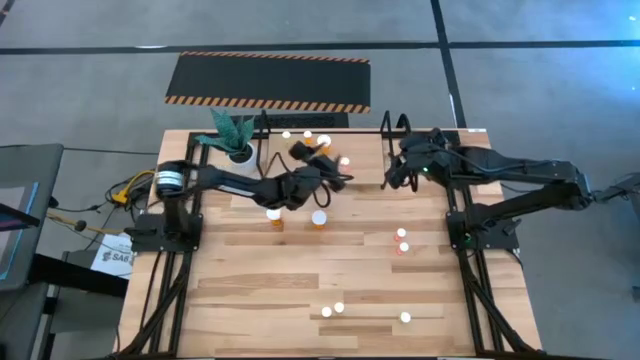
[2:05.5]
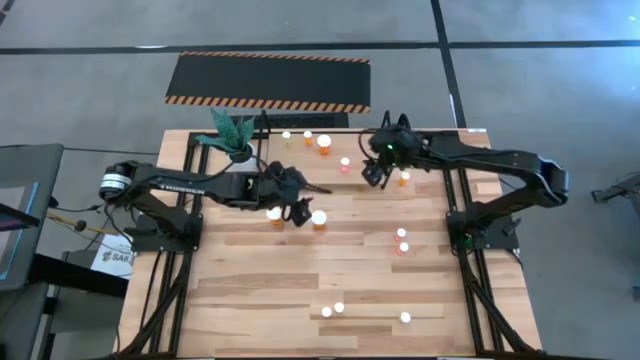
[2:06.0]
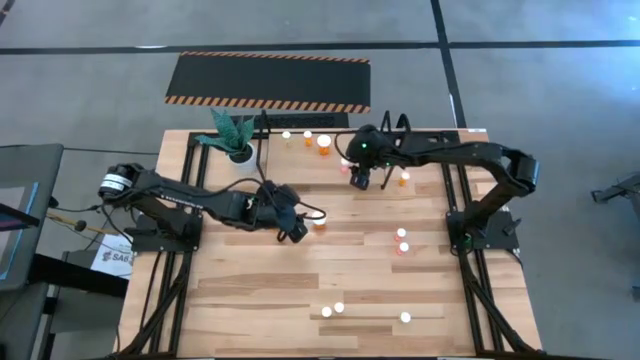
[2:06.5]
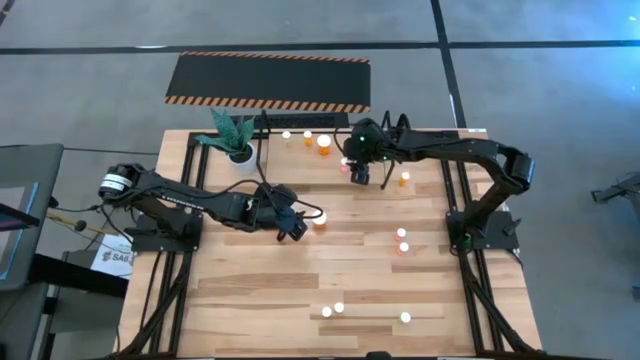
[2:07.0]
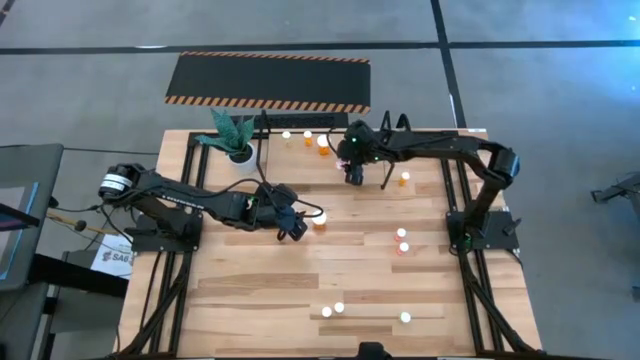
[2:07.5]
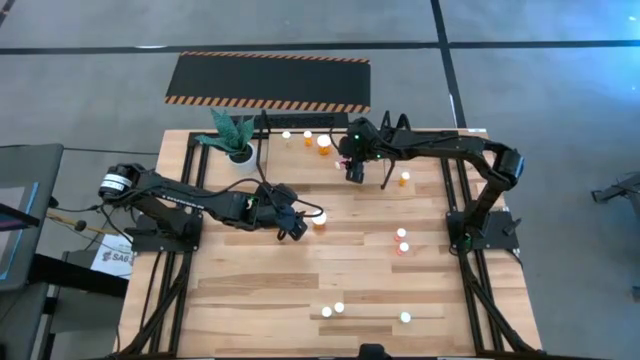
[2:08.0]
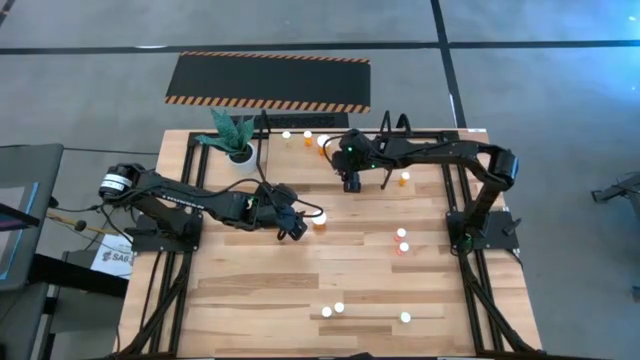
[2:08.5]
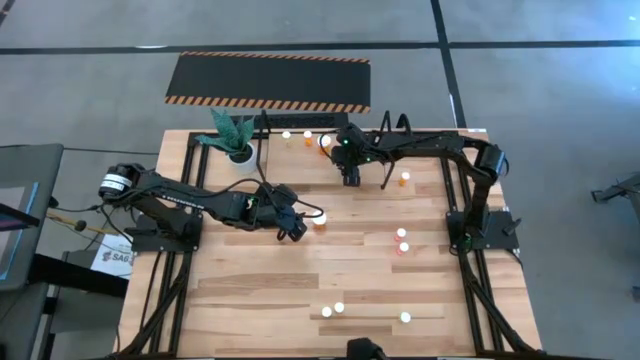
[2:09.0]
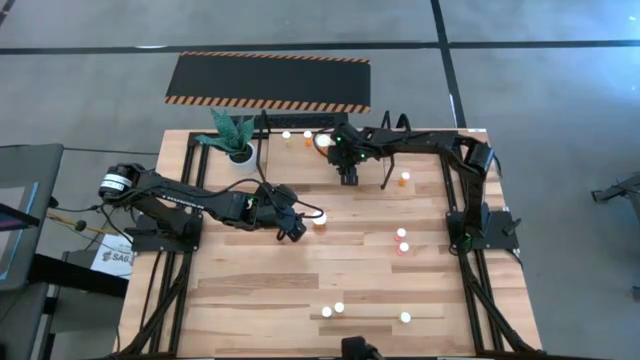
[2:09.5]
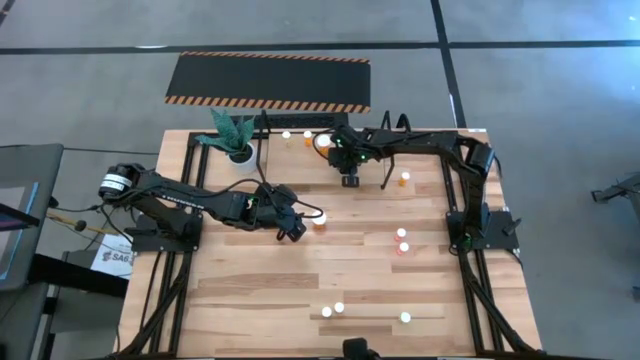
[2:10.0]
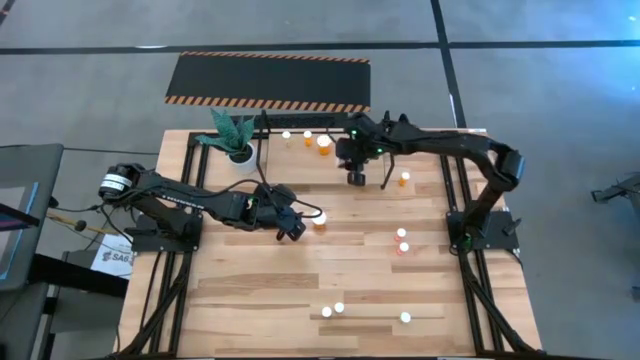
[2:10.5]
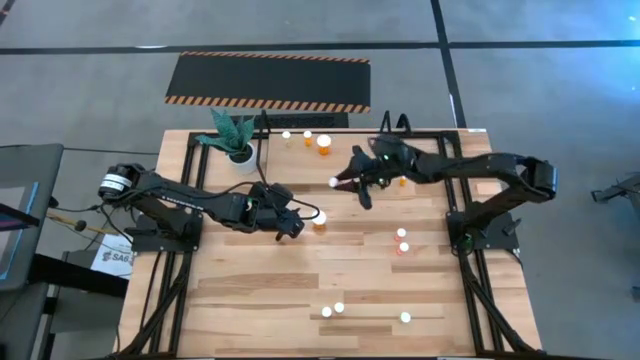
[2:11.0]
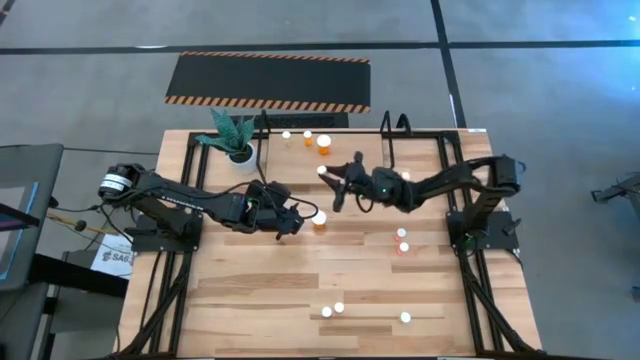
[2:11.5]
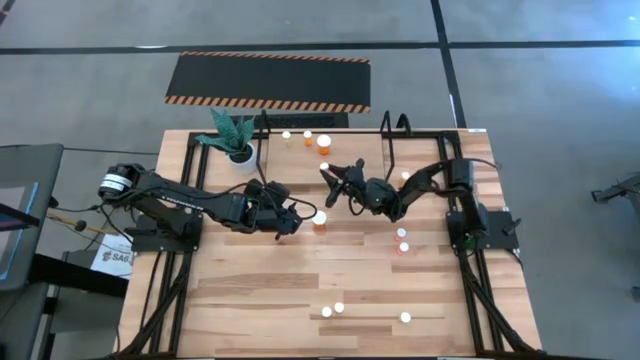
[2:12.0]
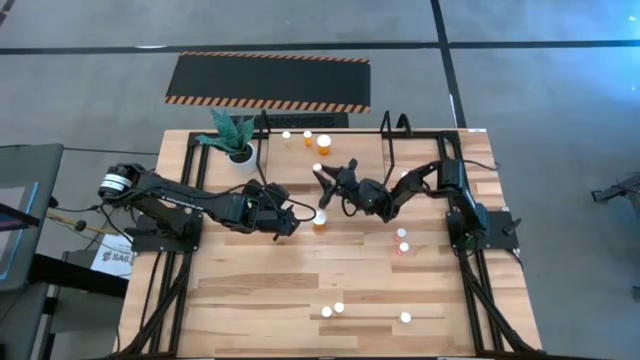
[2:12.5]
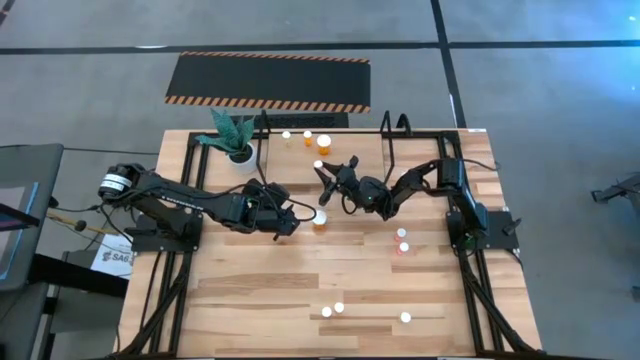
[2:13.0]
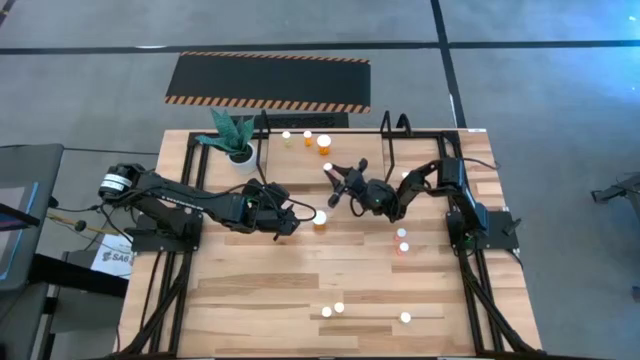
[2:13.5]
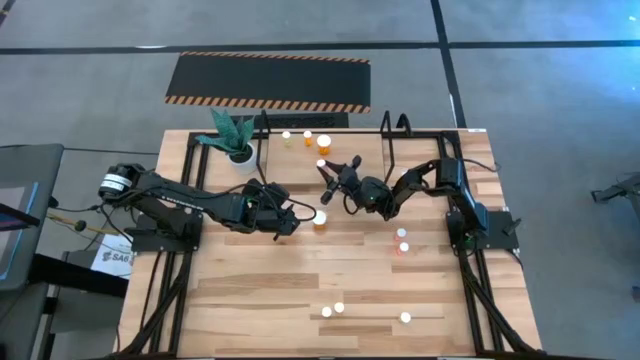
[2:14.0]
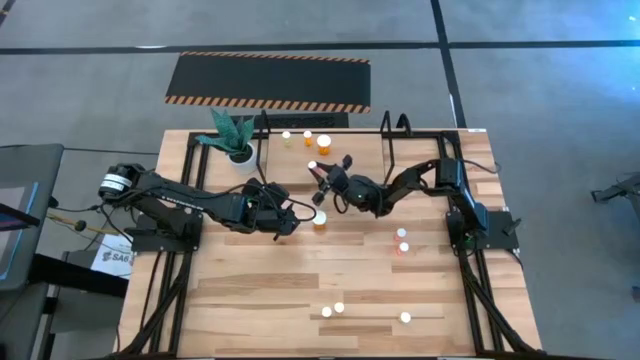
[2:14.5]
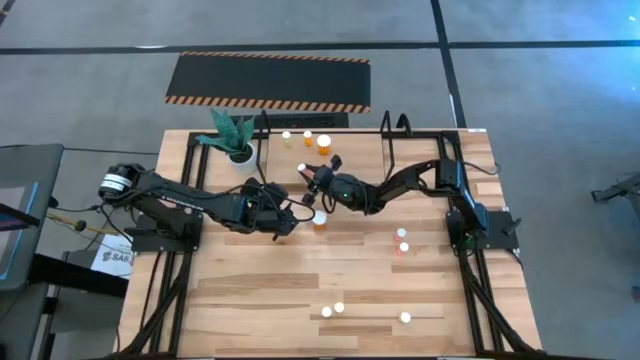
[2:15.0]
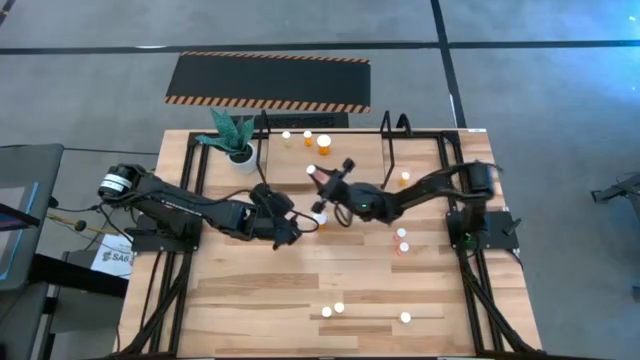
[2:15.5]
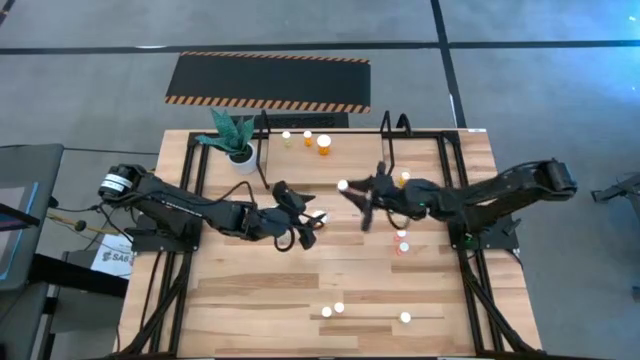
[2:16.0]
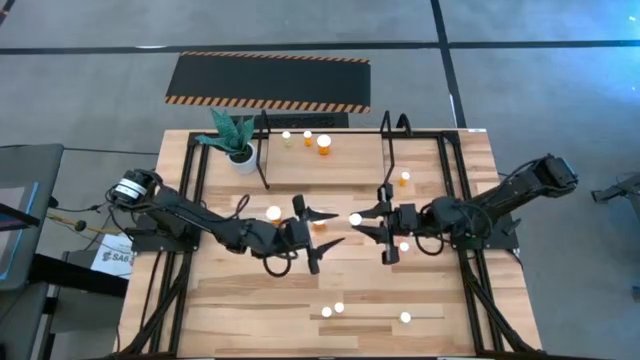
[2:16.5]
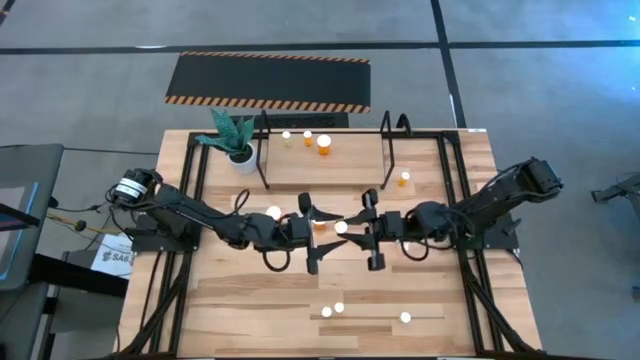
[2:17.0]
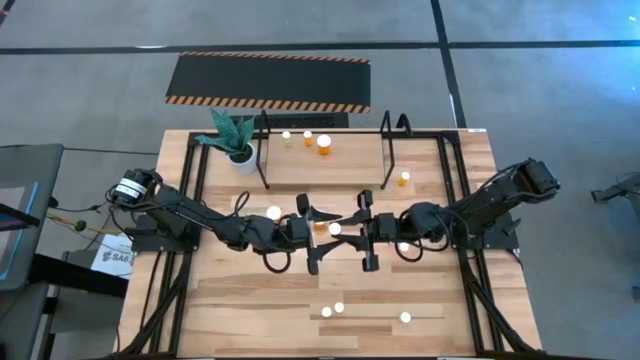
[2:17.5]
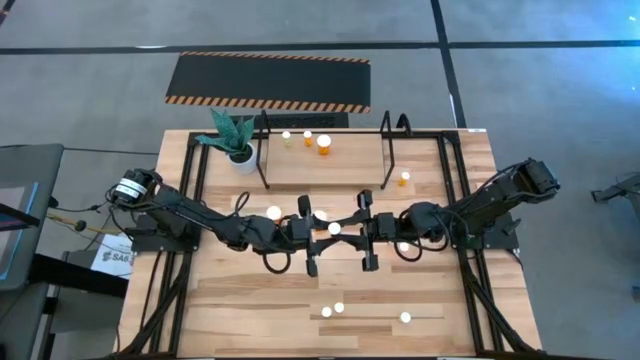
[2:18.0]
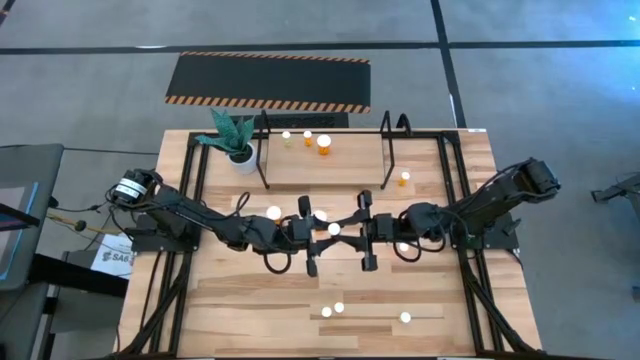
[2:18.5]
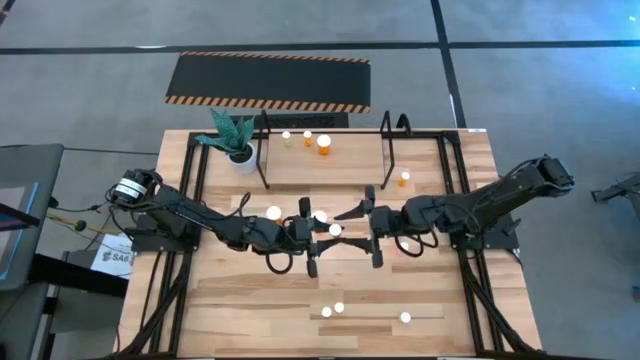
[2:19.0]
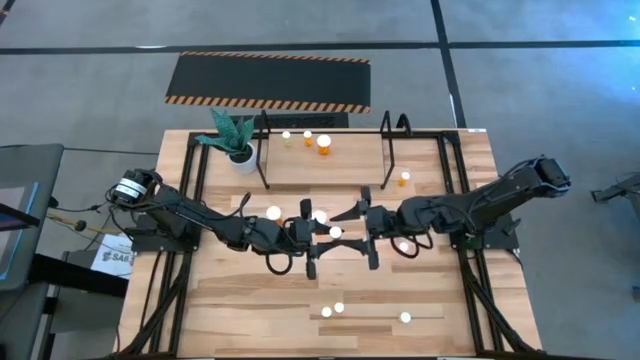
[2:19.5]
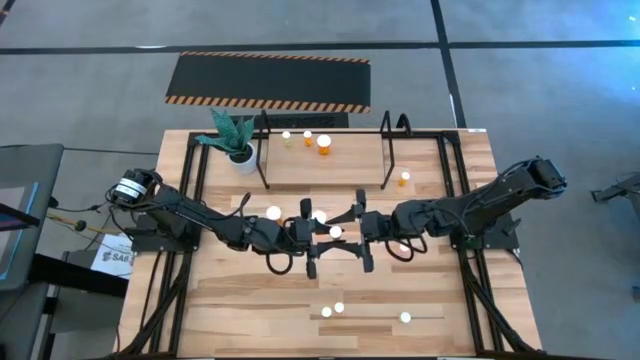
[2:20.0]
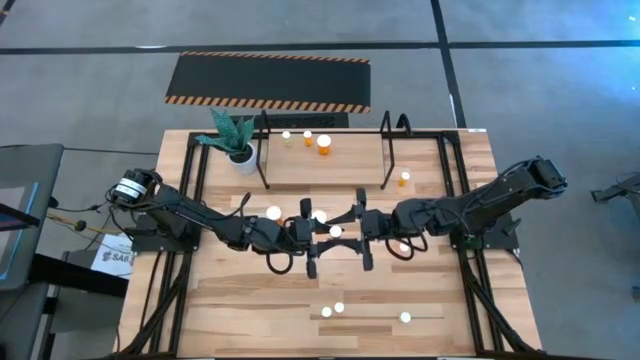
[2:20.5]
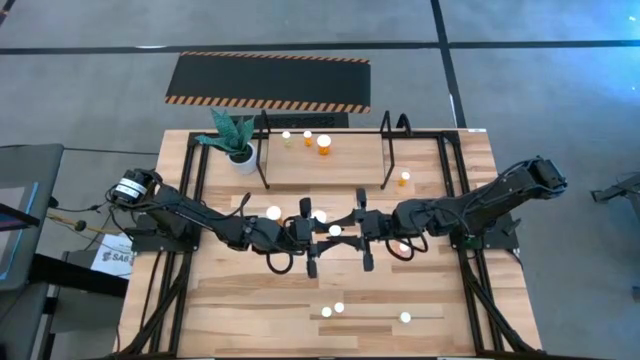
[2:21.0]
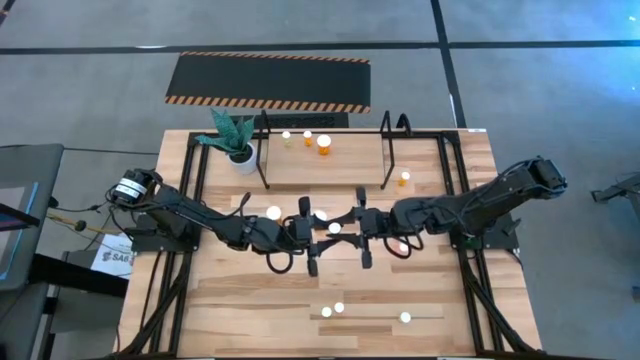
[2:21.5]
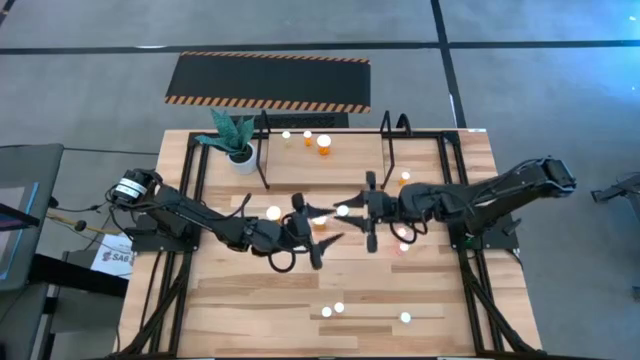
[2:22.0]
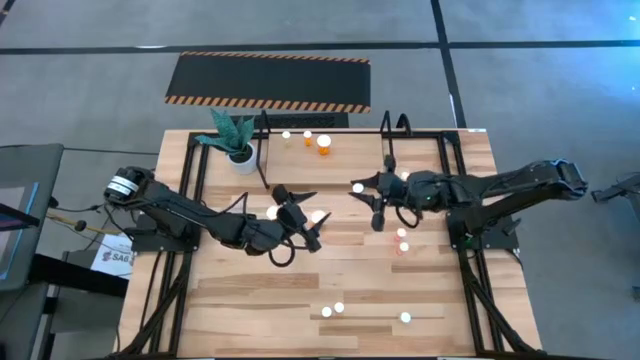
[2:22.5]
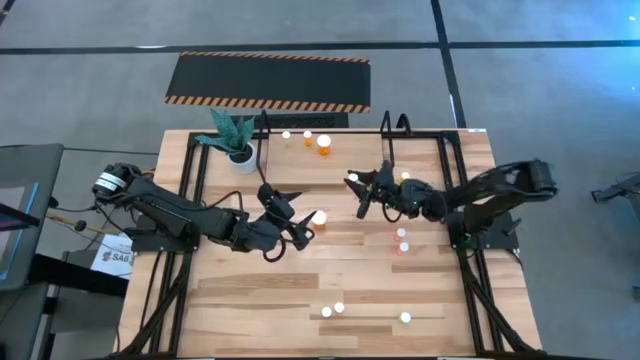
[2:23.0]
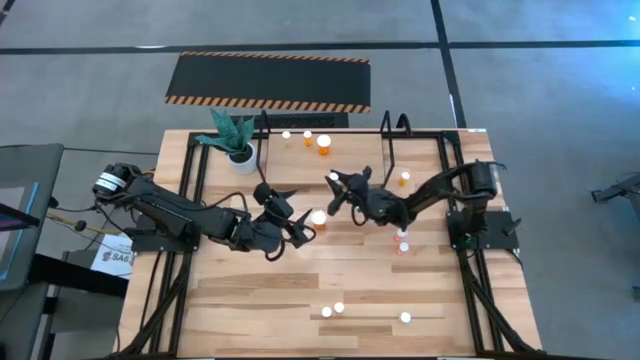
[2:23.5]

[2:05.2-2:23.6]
Task: Pick and place medicine bottles onto shelf by color
Put the bottom left pink pill bottle on the shelf
